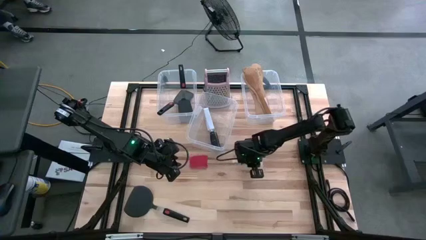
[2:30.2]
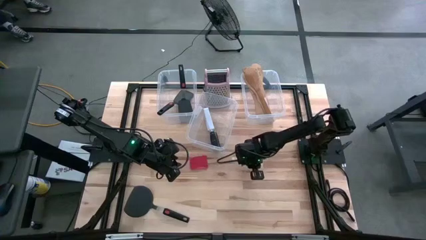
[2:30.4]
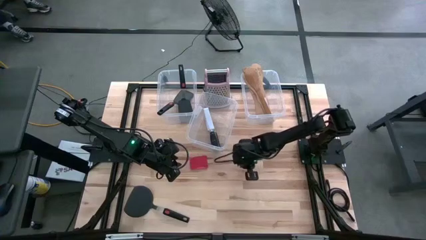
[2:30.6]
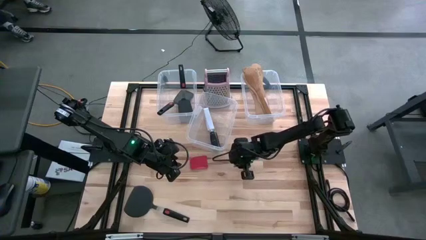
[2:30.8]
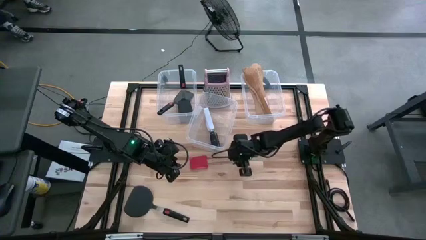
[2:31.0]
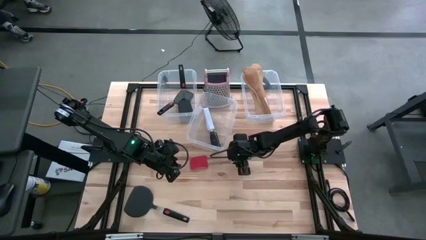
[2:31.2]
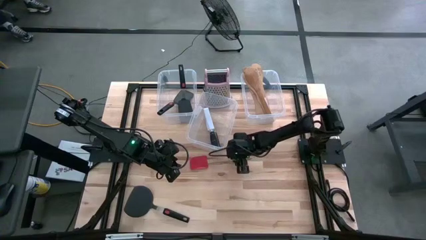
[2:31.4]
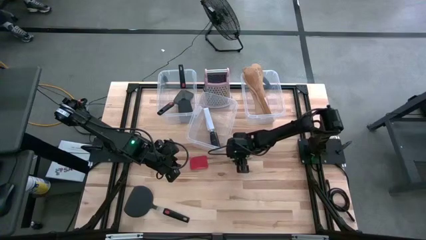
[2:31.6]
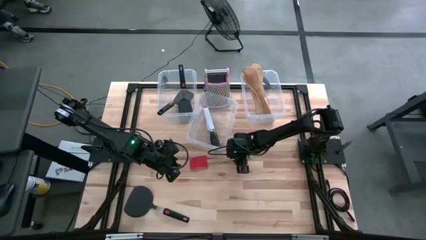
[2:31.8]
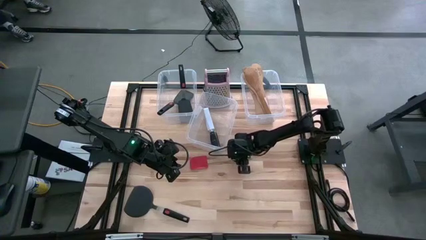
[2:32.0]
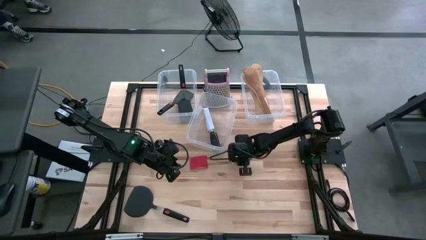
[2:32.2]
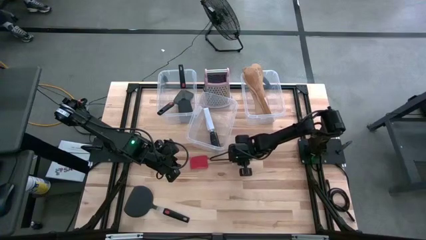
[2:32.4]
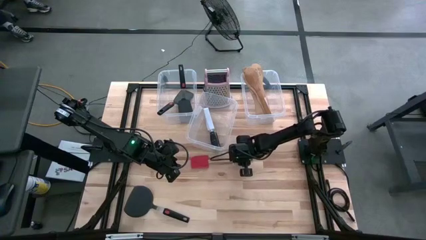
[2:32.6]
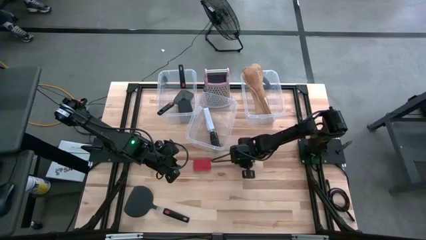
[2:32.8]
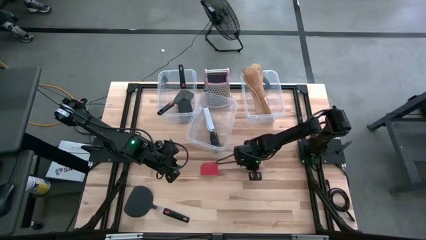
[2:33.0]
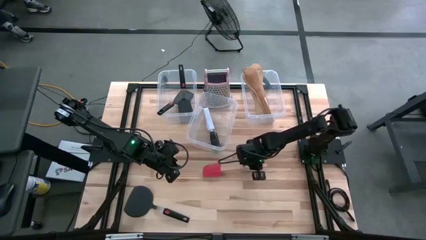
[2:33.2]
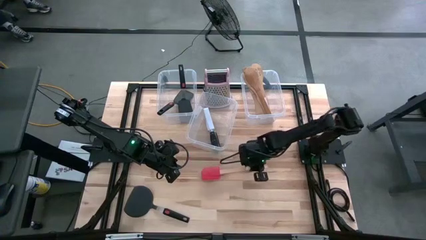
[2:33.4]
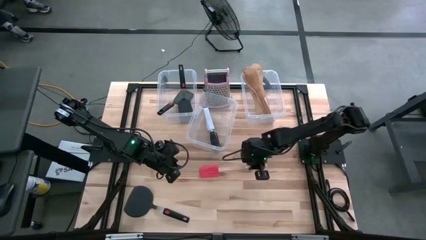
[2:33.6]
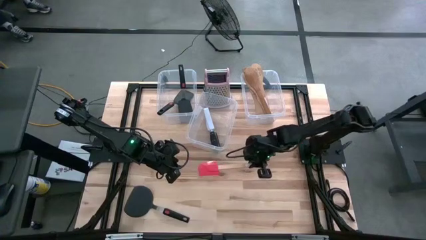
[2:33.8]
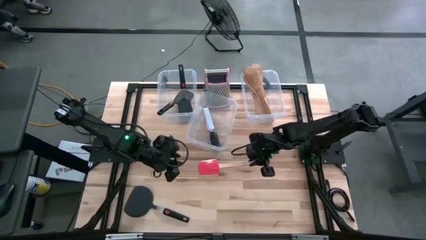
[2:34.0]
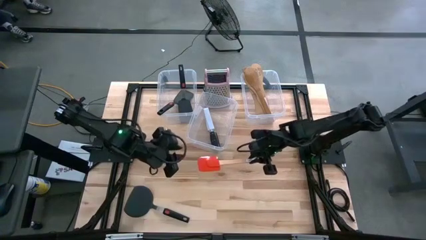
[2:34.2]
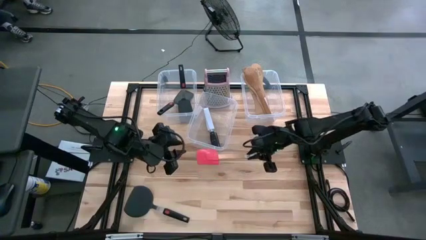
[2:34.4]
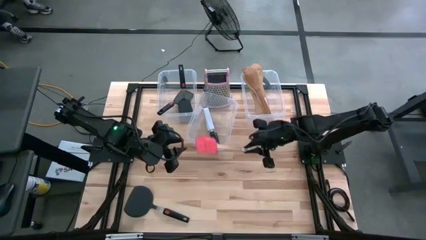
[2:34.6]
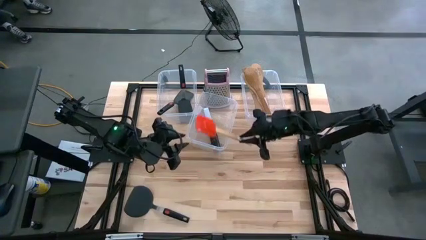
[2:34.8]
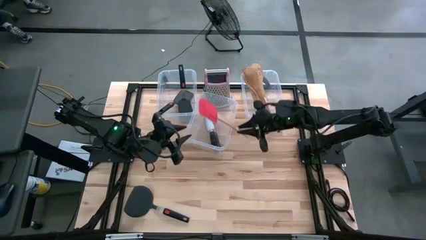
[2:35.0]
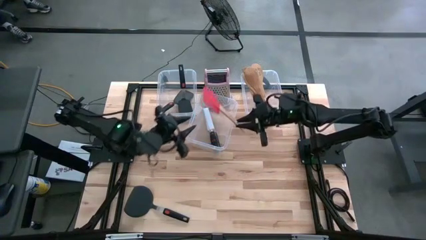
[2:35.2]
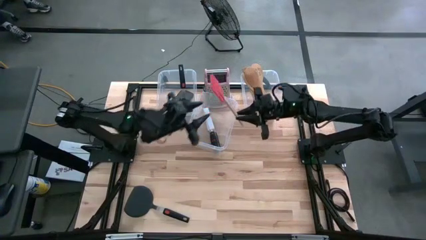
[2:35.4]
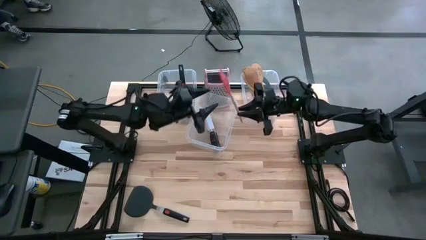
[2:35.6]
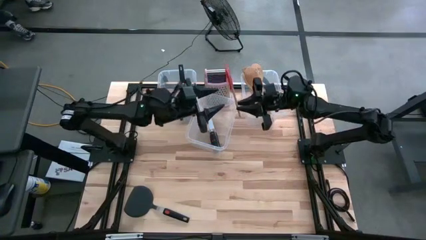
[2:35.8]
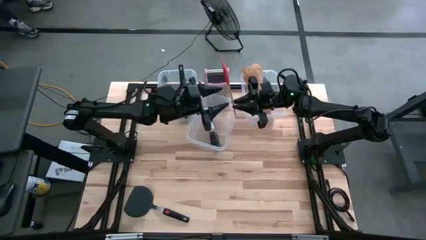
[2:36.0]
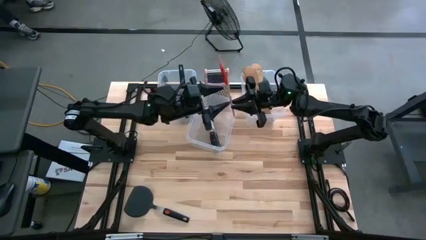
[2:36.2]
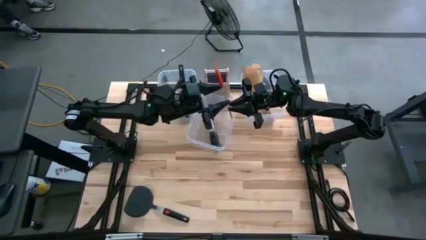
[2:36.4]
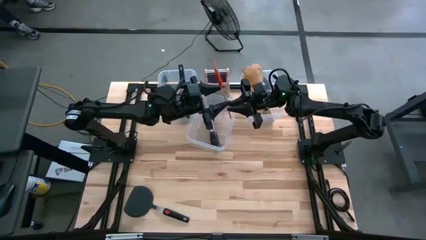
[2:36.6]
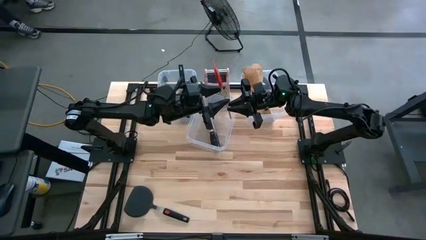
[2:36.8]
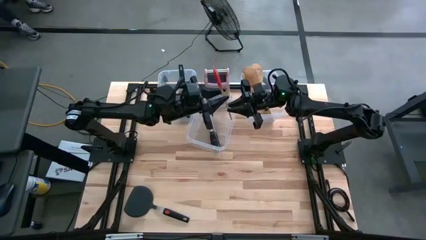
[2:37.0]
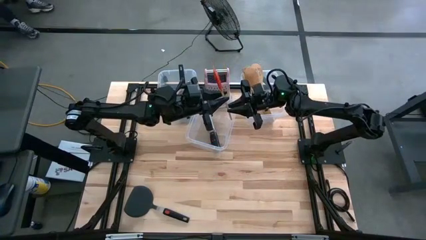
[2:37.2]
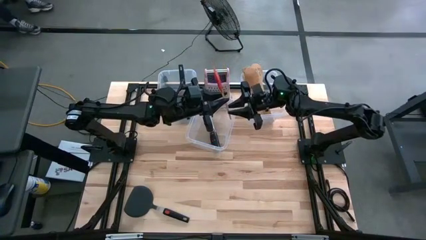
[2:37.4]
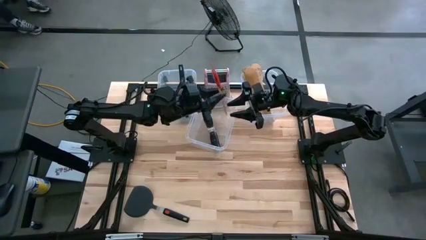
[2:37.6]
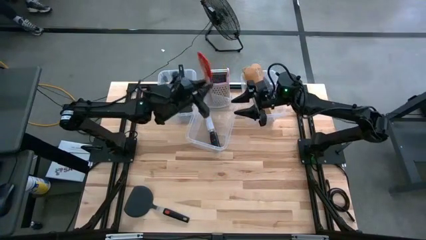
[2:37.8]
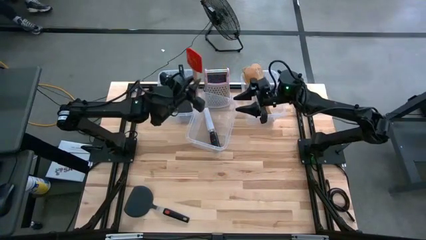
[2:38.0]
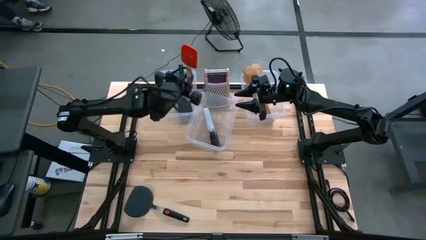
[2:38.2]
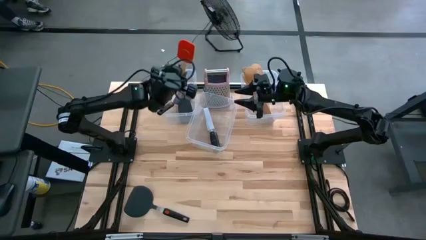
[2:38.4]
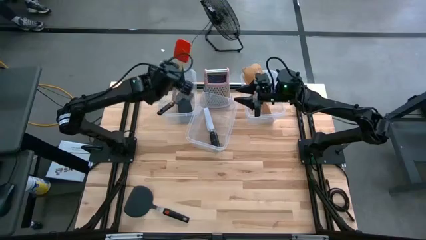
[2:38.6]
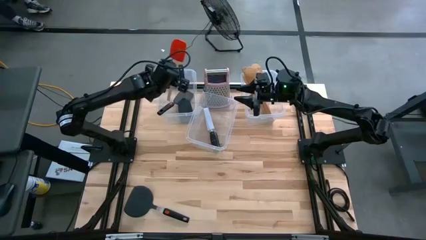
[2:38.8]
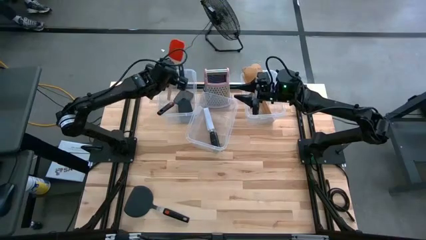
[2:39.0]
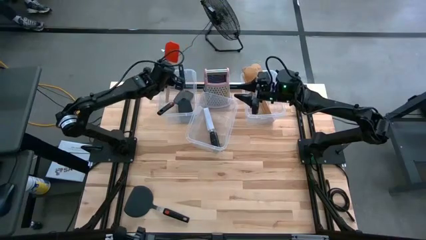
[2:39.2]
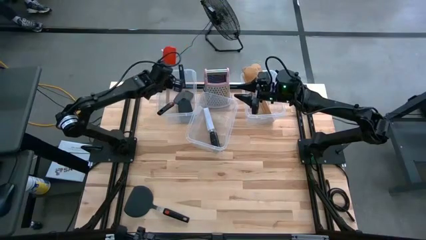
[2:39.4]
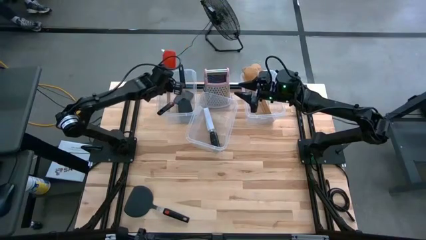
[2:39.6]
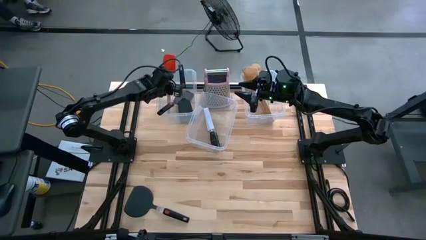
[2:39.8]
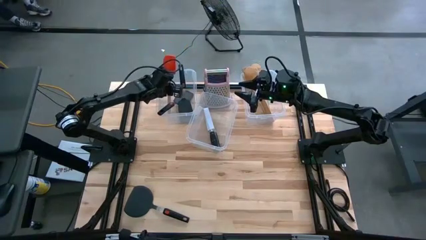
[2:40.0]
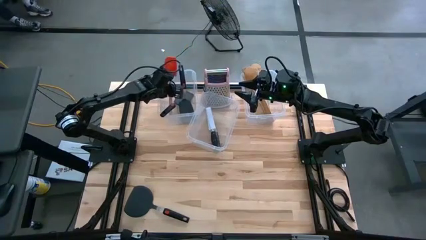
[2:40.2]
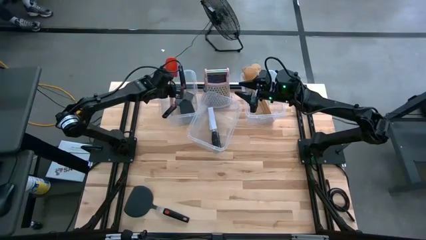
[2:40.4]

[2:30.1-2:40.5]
Task: Pick & Place Kitchen Items
Put the red spatula into the left transparent bin

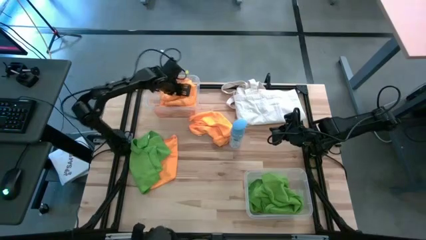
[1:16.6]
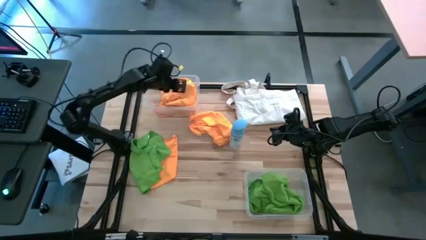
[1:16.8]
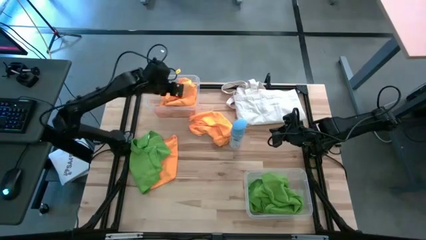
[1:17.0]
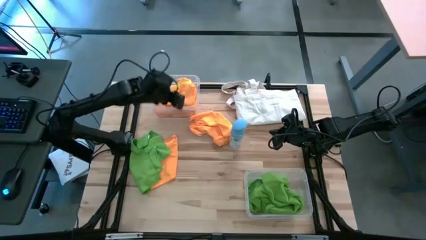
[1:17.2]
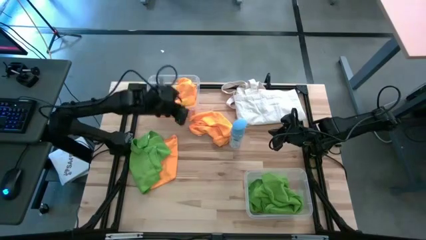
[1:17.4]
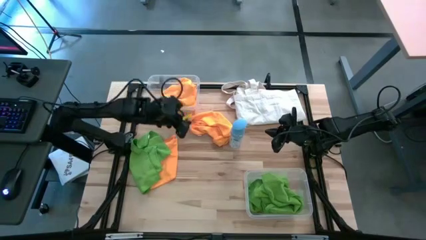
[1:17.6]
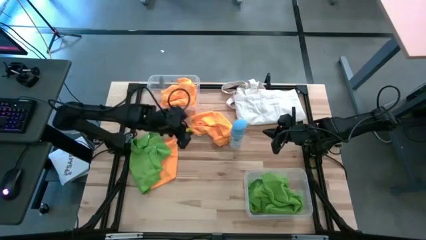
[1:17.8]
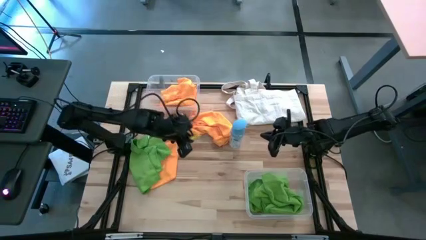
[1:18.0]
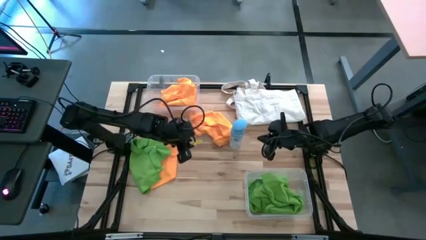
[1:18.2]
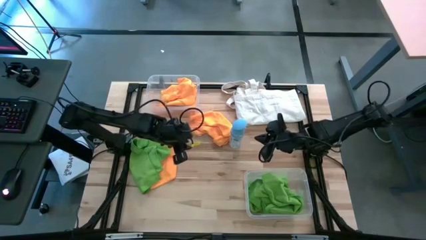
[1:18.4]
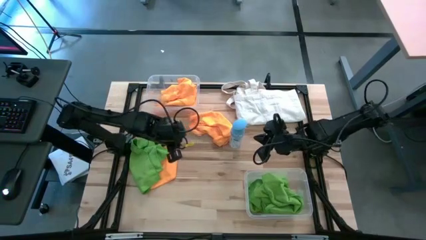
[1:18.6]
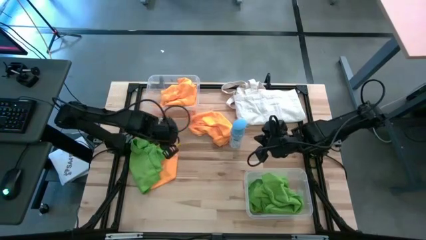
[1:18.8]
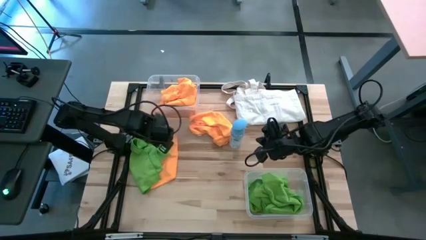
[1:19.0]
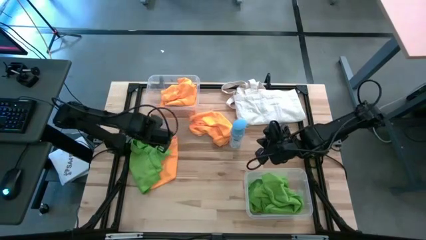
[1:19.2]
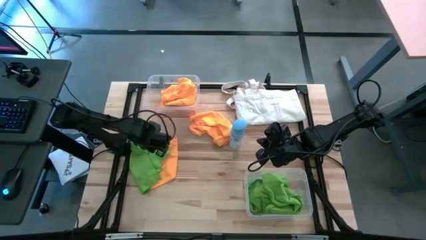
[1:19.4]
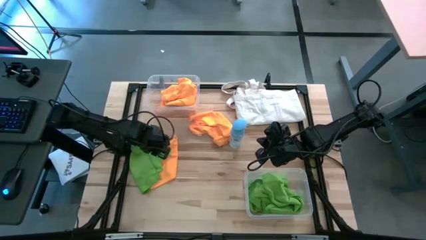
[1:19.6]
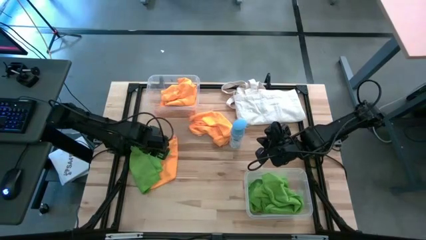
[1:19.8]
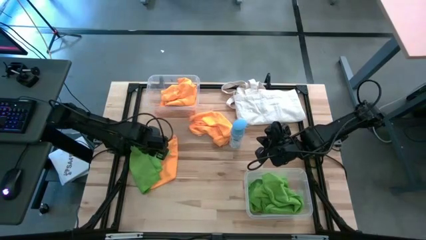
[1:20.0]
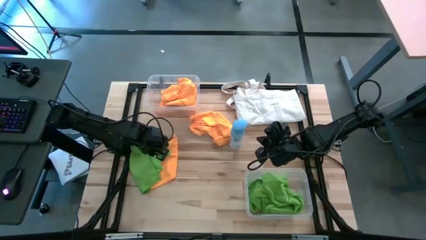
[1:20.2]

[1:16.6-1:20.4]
Task: Sort microfiber towel by color & place in baskets
Put the green microfiber towel into the bottom transparent bin
